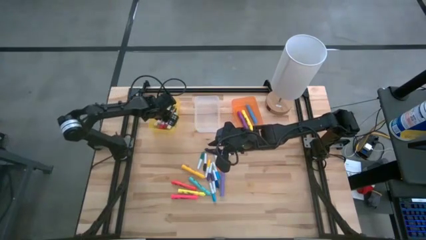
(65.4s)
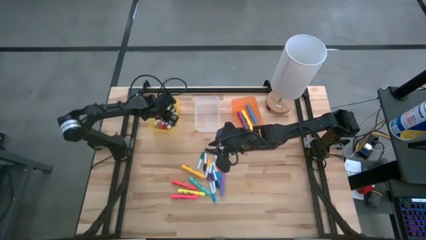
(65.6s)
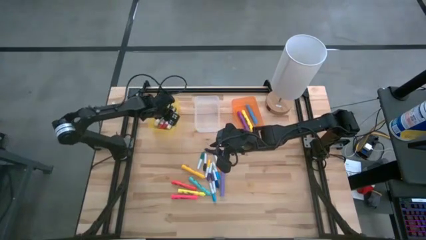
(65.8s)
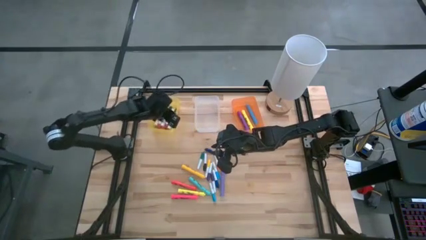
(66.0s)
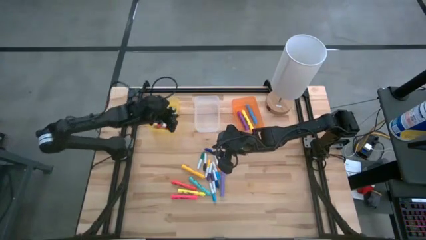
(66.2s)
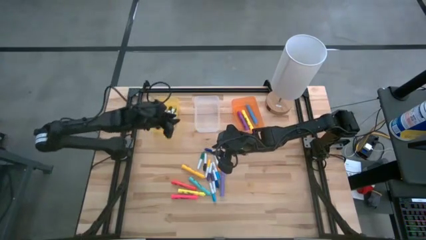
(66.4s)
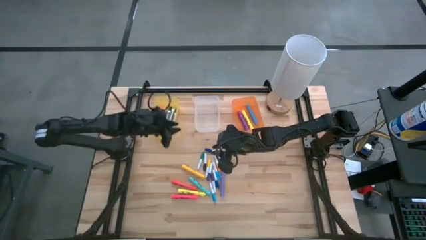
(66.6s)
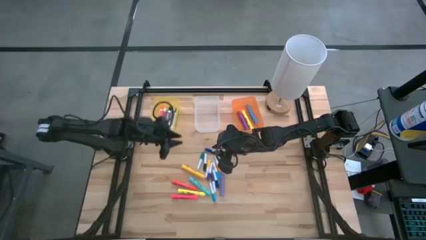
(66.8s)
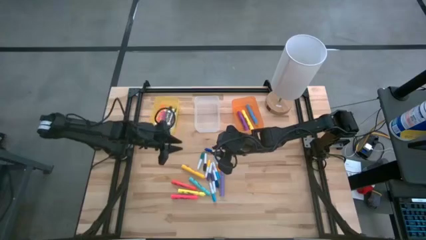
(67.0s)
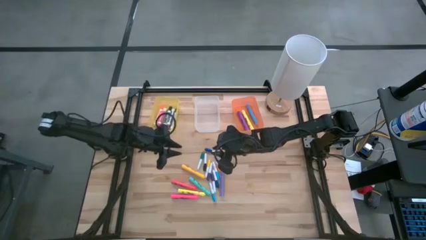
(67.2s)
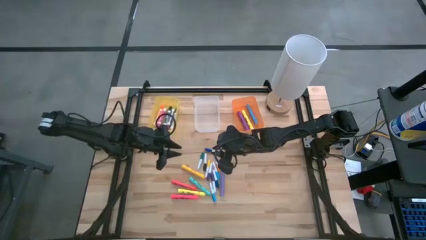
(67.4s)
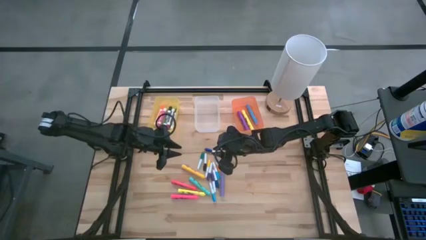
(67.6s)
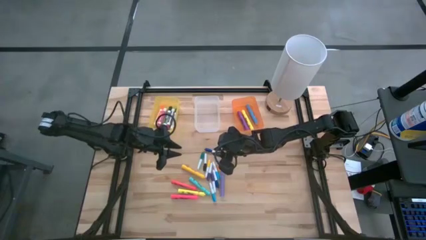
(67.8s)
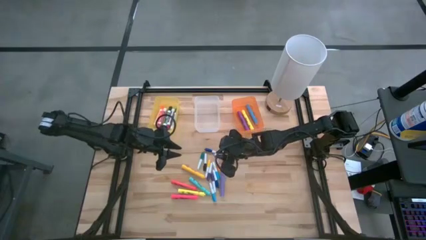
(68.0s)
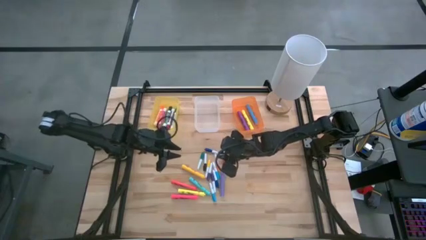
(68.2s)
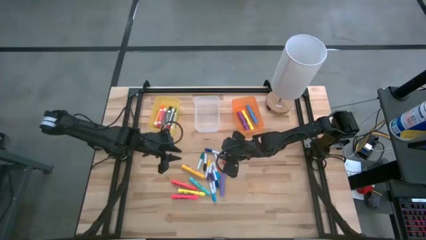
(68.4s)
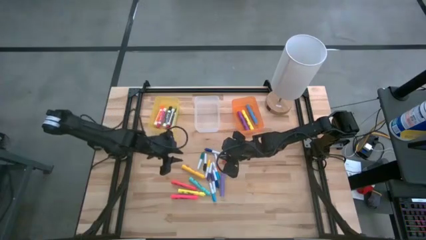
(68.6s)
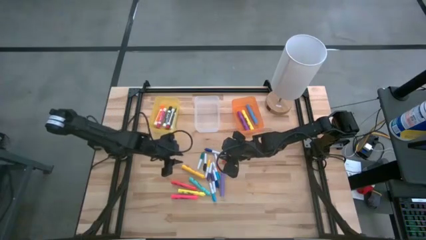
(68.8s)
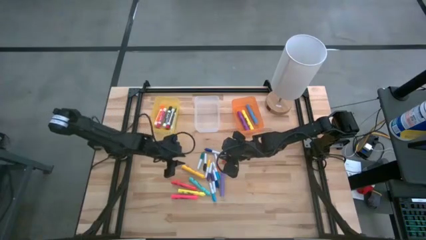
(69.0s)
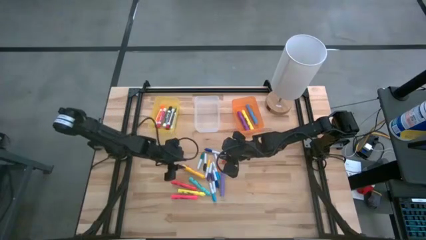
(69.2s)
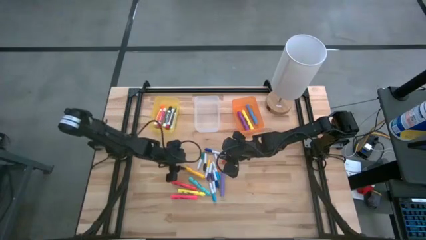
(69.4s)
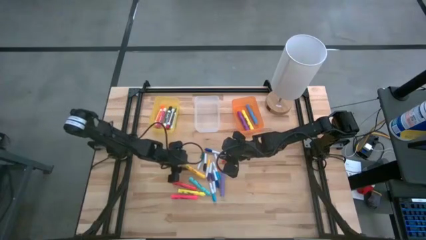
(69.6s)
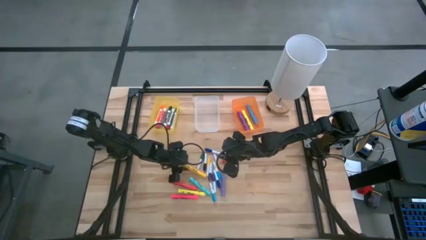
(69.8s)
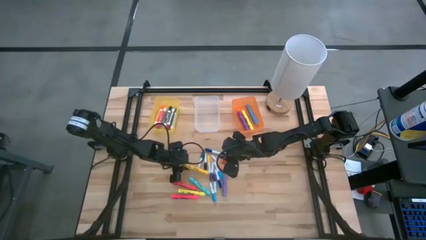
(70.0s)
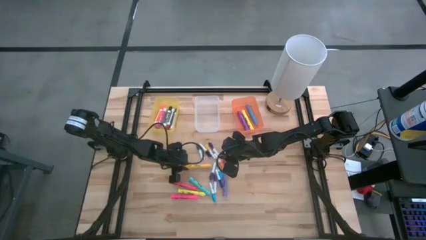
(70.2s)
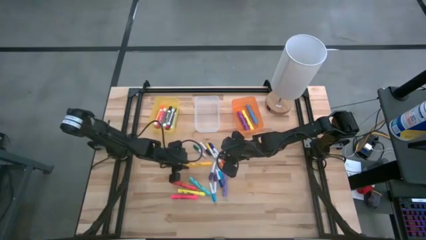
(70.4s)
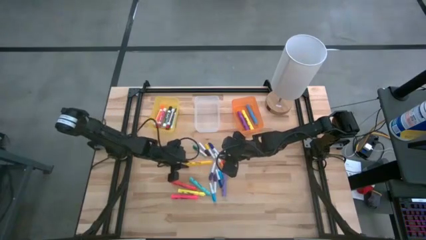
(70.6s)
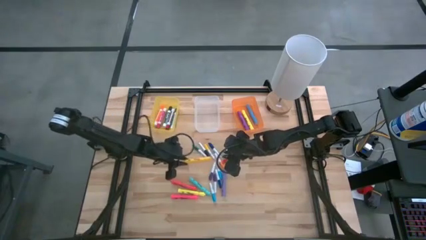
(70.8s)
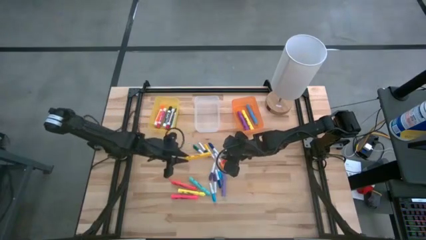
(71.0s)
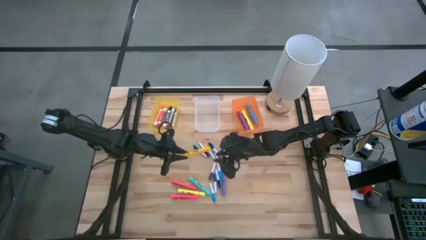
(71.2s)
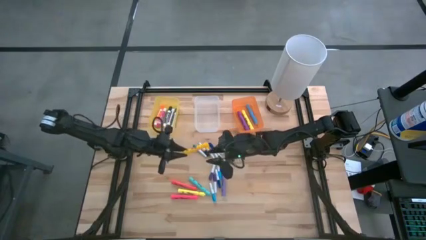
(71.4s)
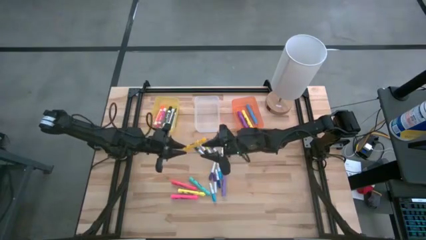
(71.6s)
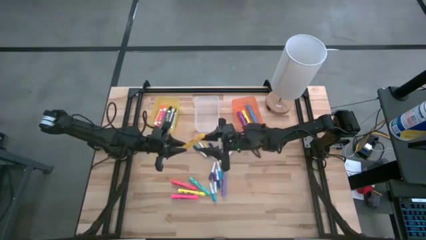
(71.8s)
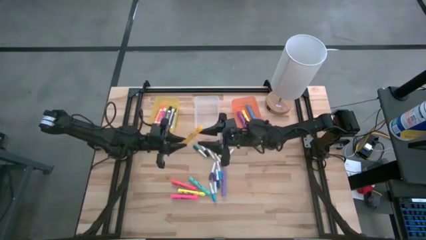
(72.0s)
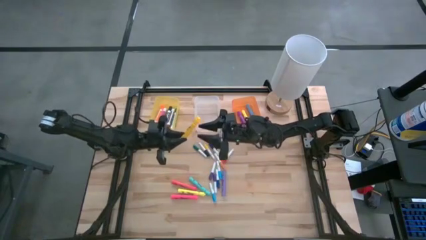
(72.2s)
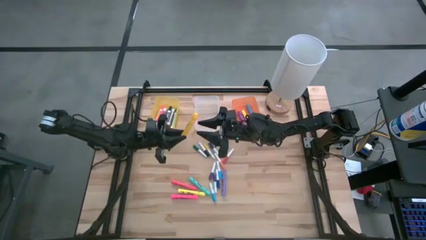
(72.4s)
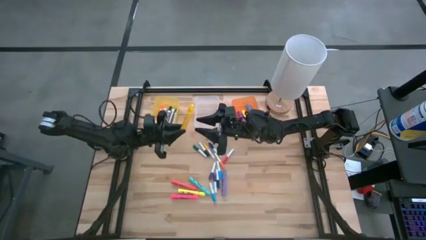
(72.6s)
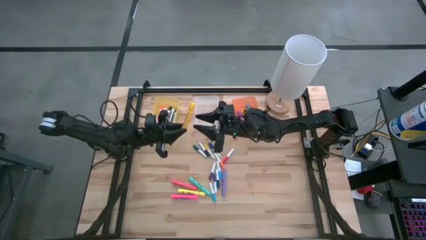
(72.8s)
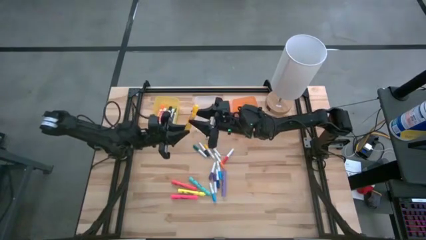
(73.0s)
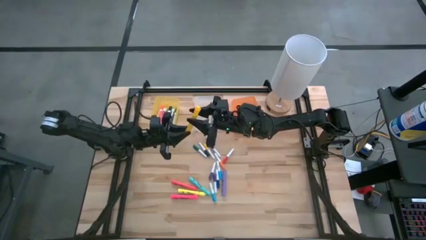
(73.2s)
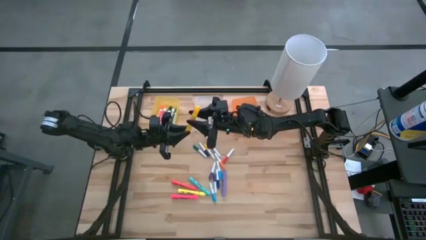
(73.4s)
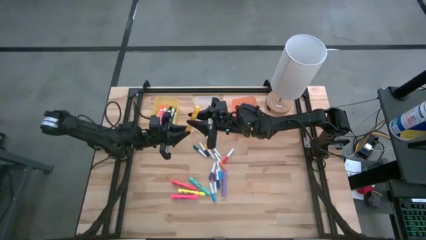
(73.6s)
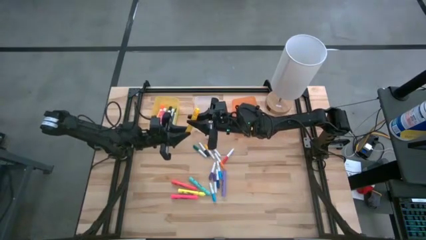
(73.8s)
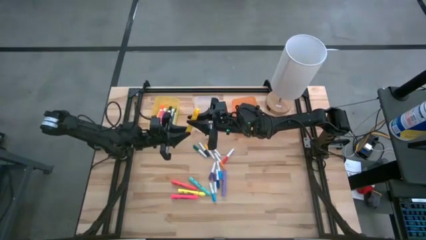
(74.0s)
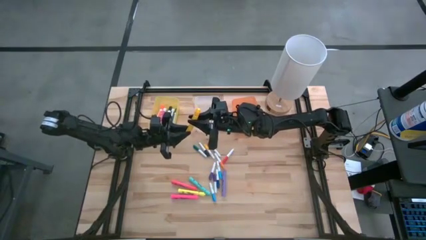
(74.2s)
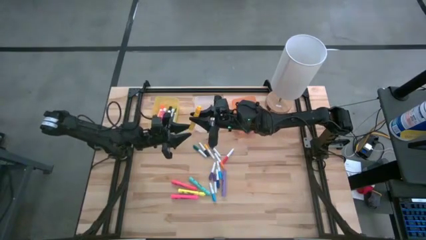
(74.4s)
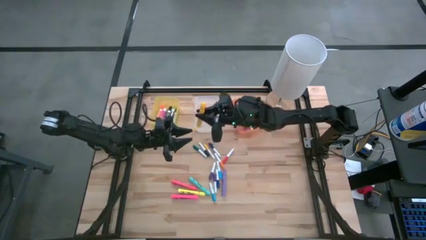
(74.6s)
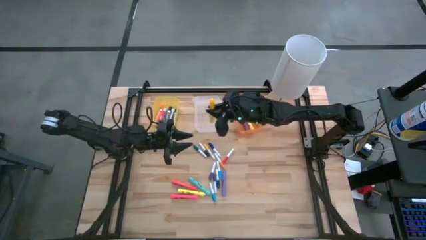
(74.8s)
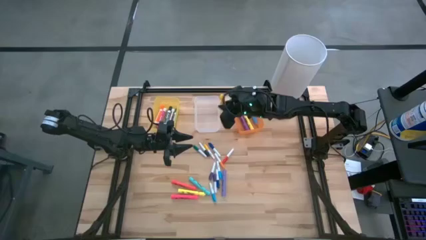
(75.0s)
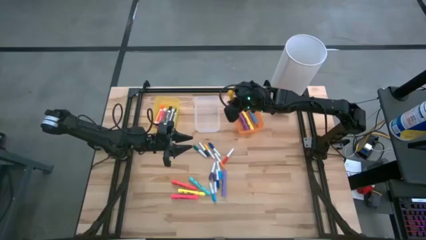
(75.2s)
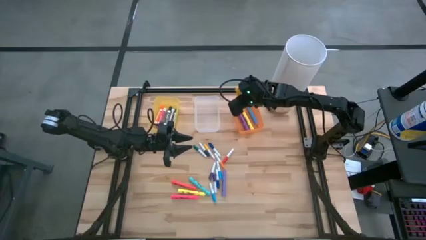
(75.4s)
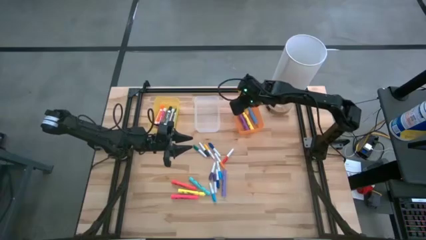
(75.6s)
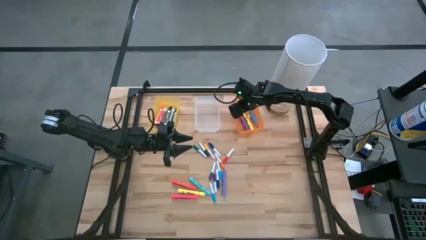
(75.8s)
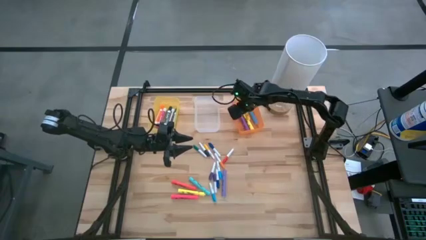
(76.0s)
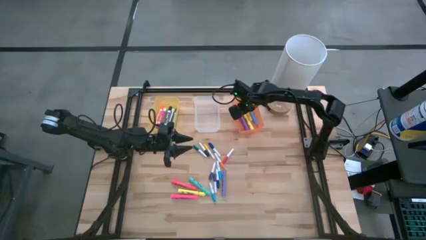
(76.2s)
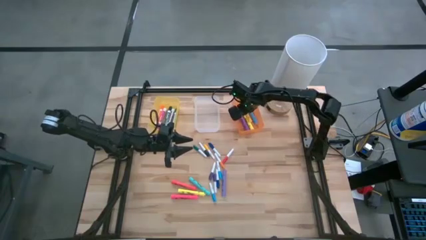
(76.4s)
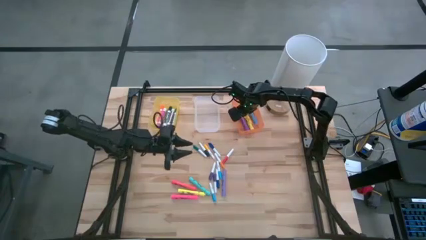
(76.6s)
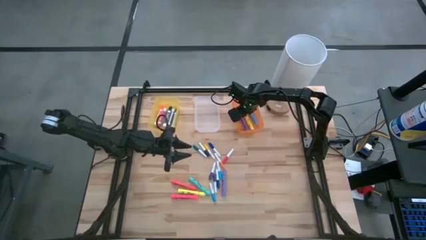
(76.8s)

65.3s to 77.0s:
Task: Pick & Place Markers
Put the large yellow highlighter pen into the orange bin

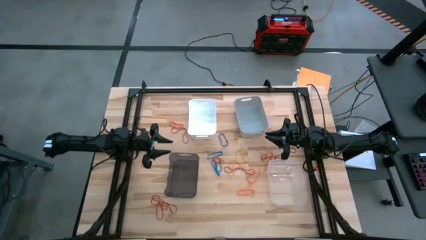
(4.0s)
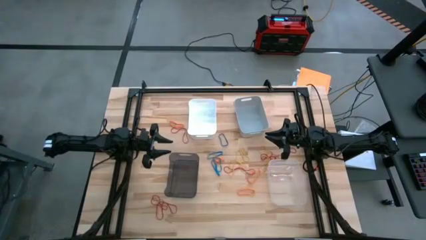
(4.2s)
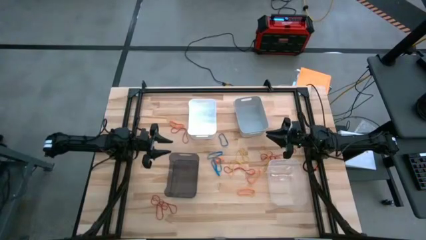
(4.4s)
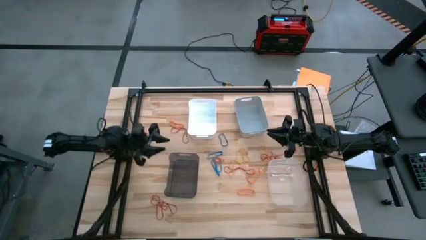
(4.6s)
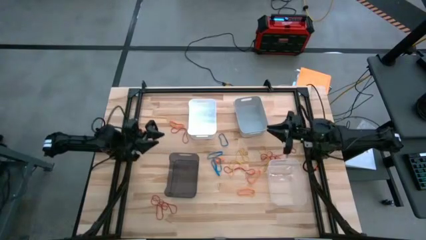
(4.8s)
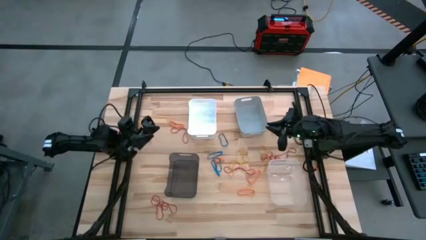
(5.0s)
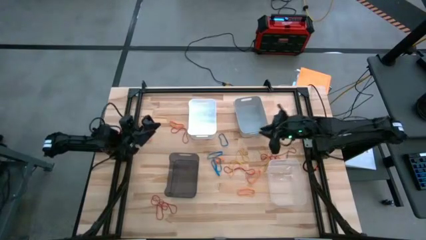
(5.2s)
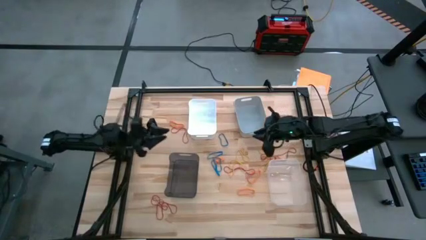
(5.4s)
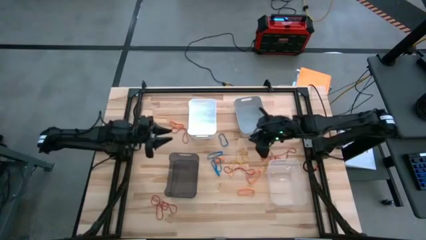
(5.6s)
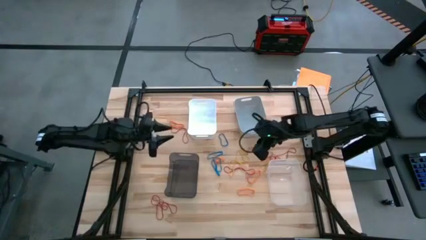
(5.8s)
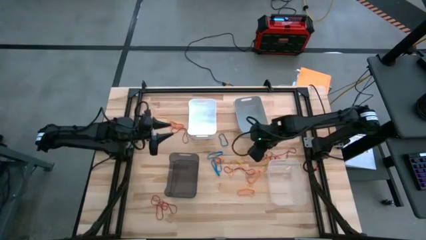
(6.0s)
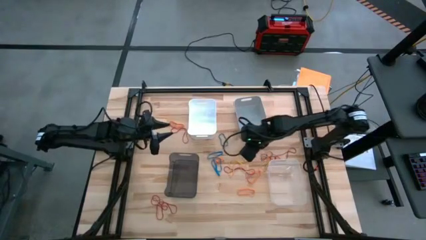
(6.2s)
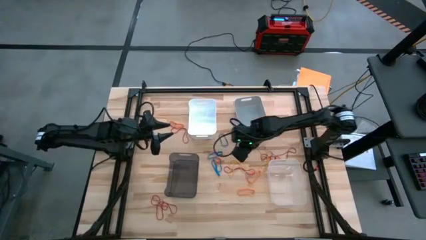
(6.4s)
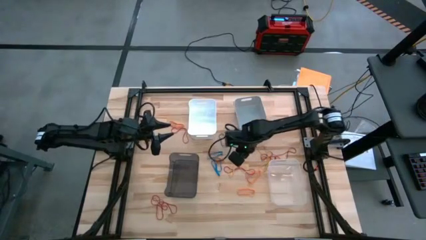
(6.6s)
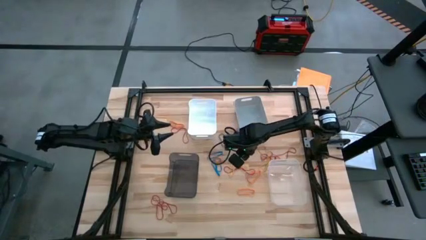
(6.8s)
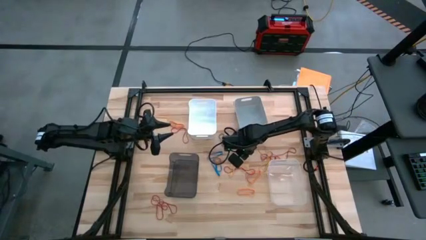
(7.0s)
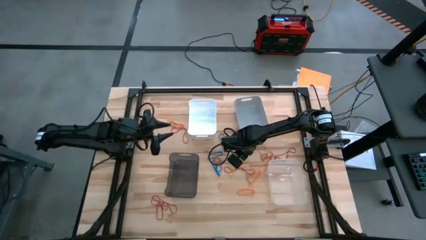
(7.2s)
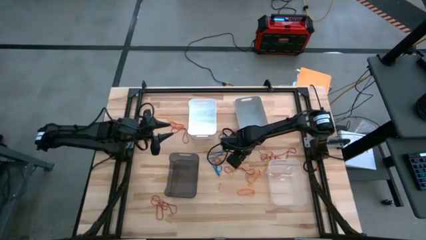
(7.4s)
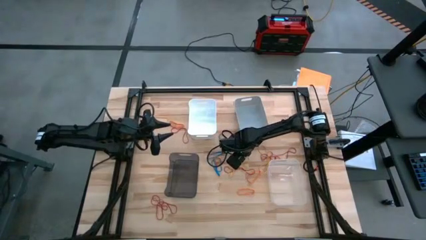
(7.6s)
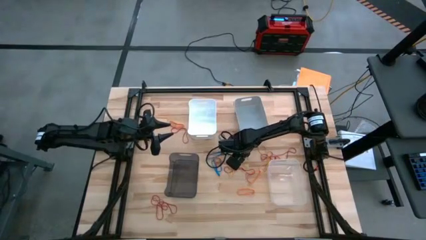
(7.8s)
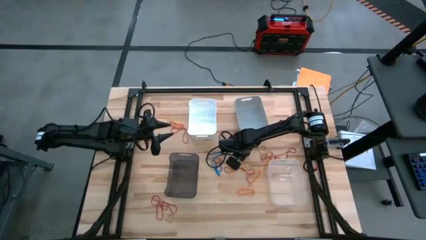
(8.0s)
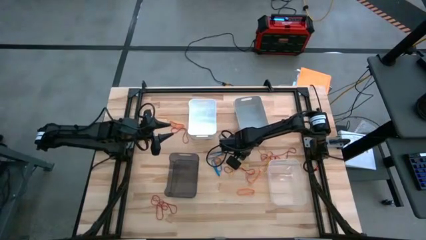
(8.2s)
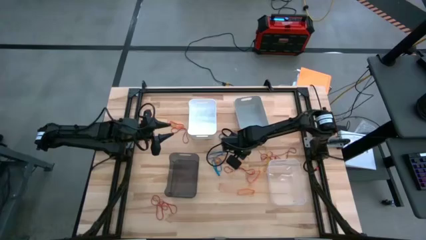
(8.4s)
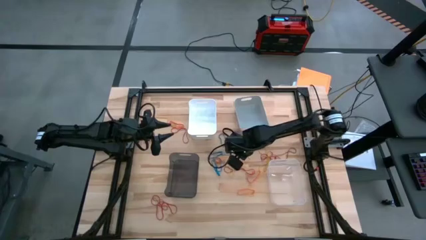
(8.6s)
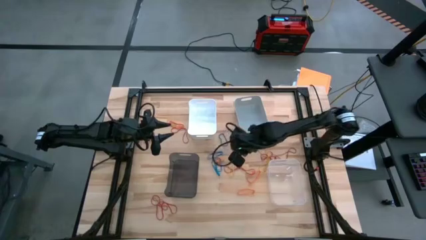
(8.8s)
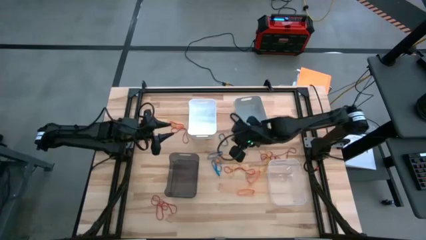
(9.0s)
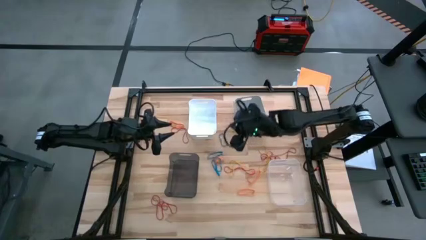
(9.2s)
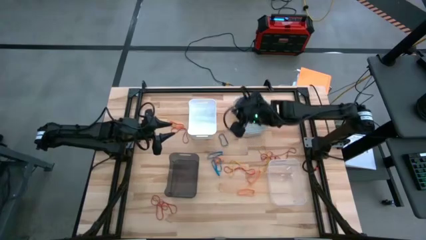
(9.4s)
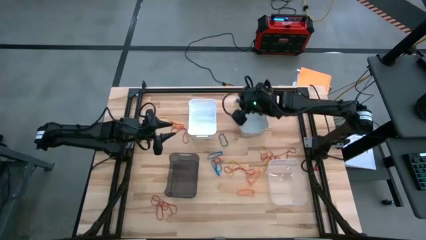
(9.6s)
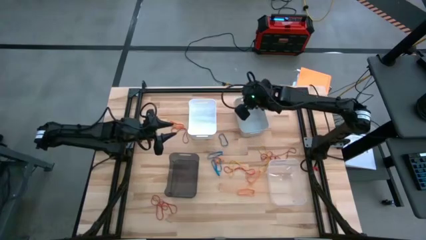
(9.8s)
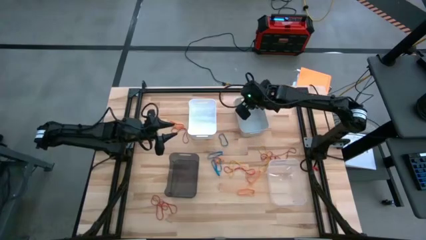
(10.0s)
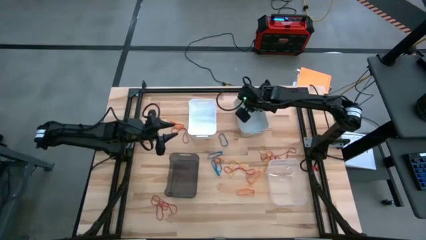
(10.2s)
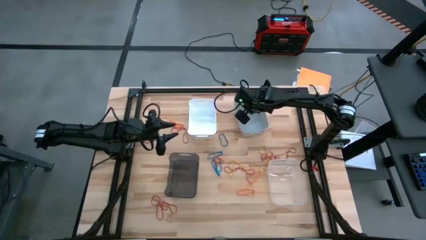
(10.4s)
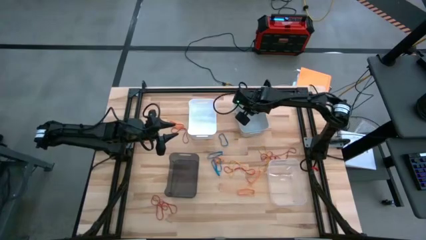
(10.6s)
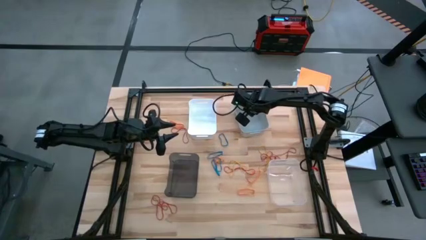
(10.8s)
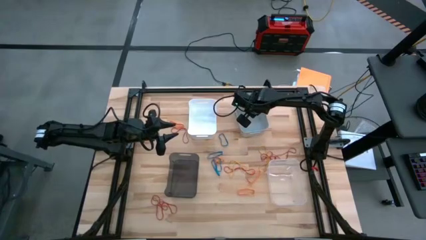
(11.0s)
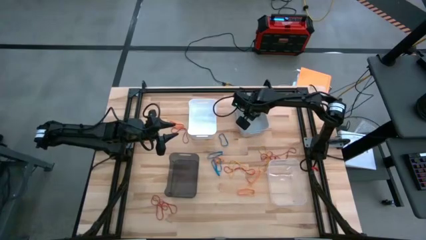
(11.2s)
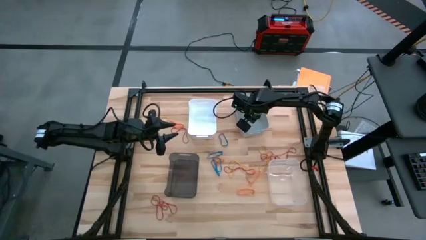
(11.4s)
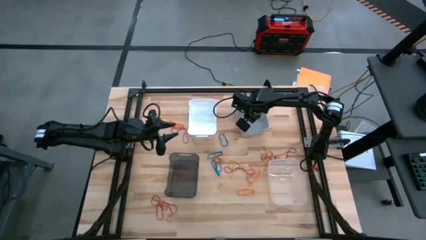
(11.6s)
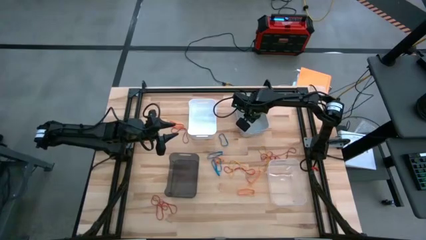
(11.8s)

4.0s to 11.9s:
Task: Sort rubber bands into baskets
Put the yellow rubber band into the gray bin
